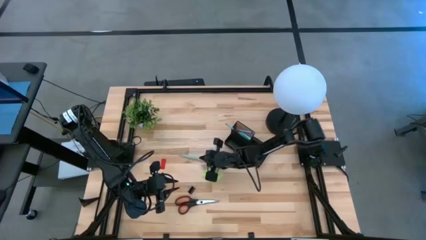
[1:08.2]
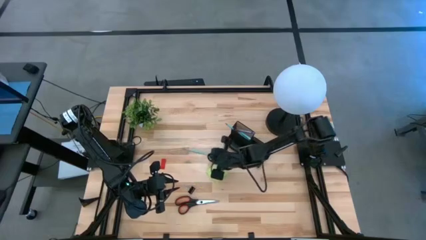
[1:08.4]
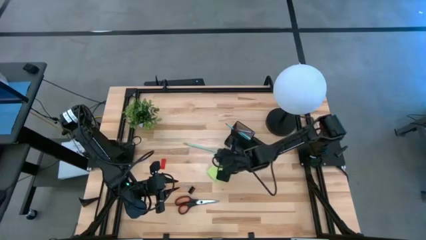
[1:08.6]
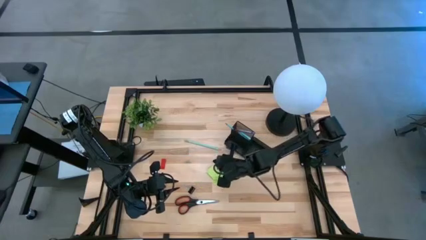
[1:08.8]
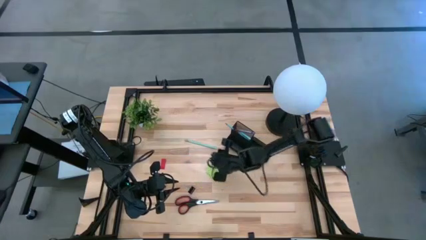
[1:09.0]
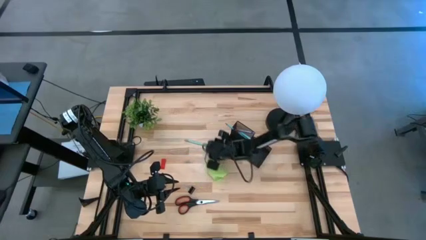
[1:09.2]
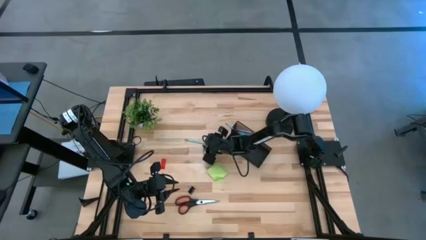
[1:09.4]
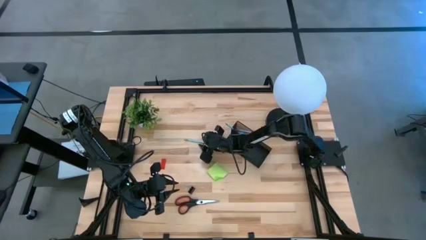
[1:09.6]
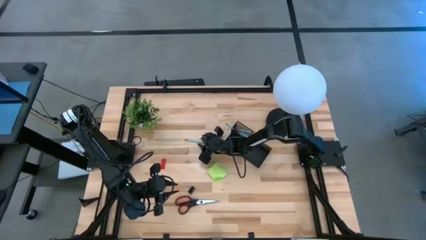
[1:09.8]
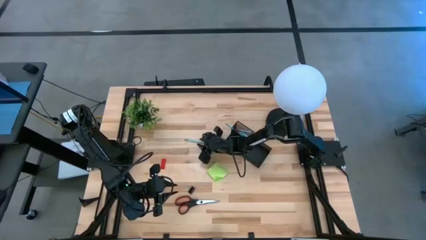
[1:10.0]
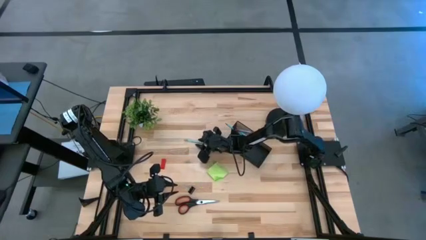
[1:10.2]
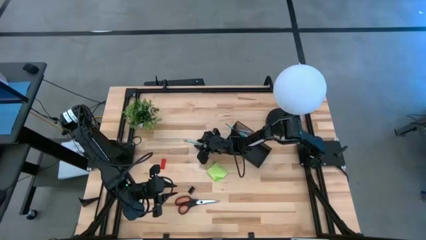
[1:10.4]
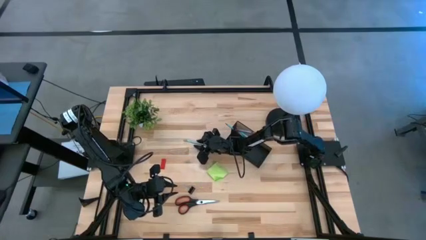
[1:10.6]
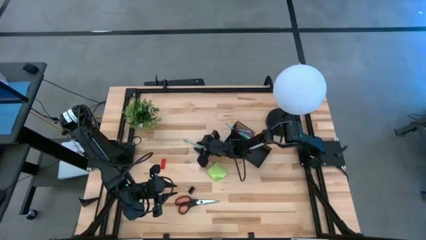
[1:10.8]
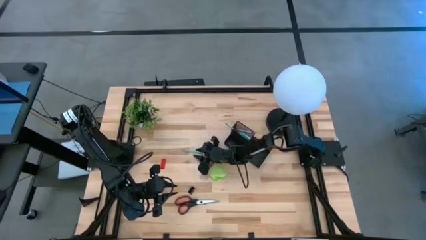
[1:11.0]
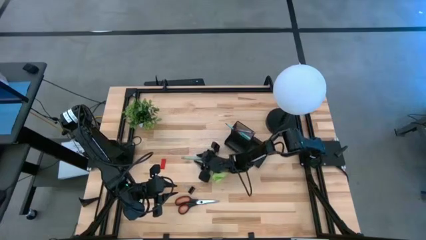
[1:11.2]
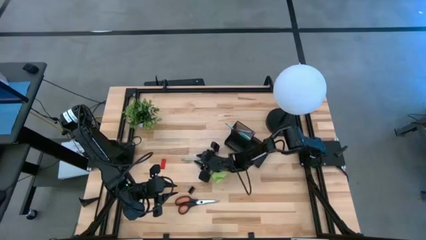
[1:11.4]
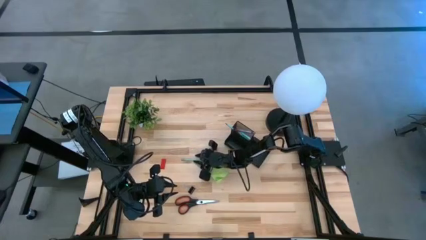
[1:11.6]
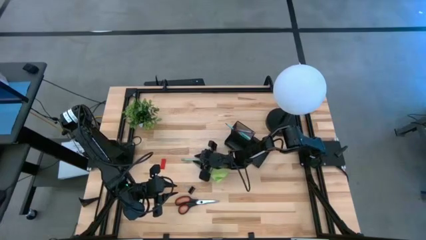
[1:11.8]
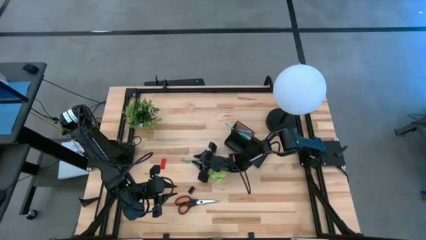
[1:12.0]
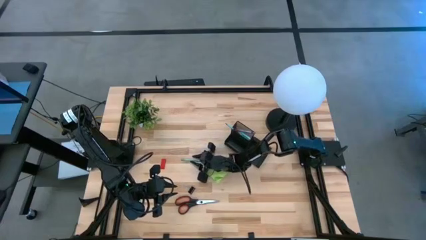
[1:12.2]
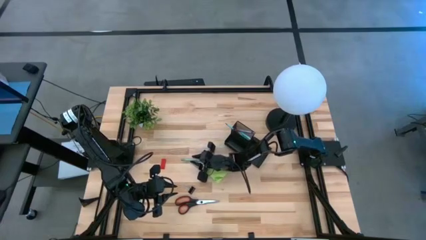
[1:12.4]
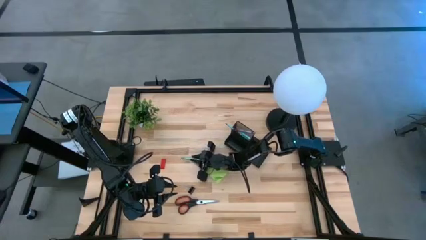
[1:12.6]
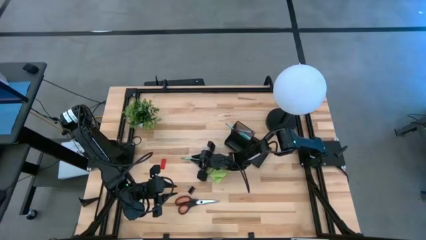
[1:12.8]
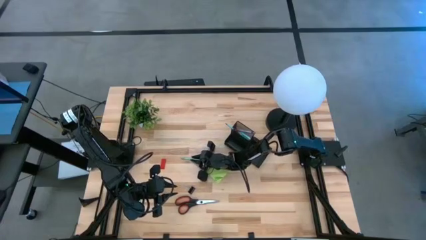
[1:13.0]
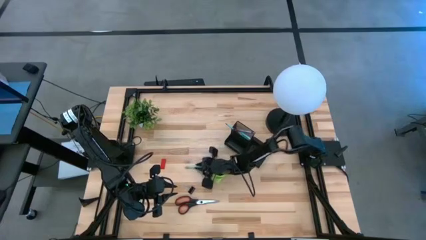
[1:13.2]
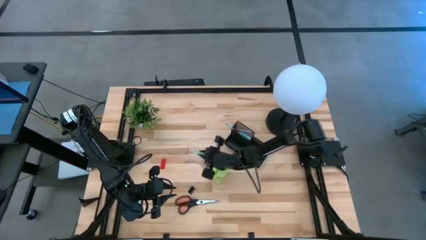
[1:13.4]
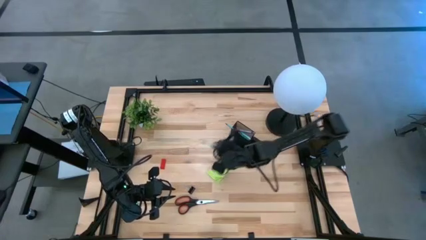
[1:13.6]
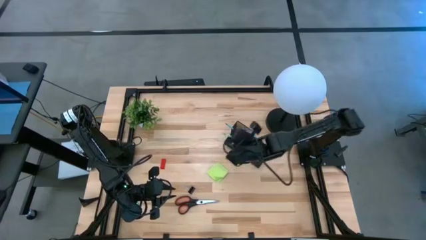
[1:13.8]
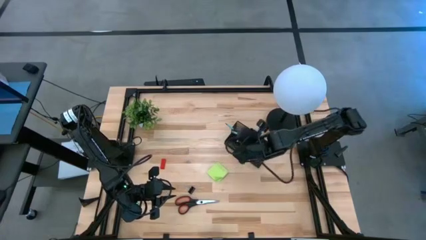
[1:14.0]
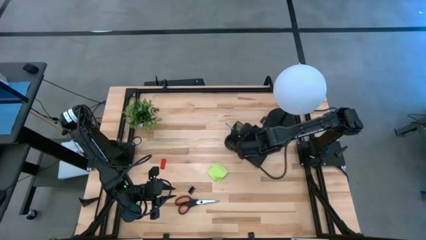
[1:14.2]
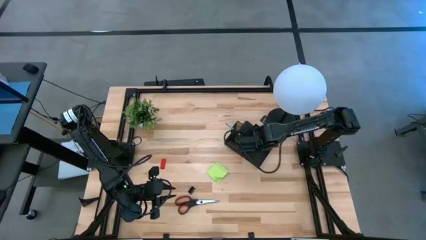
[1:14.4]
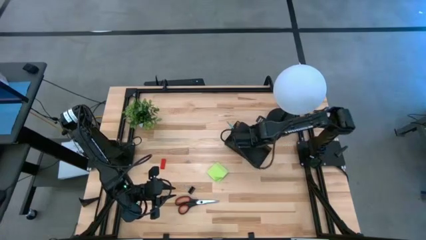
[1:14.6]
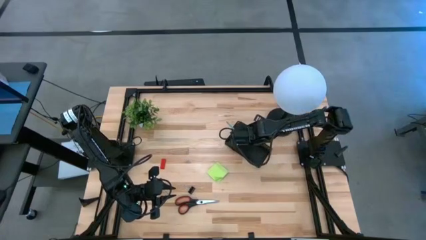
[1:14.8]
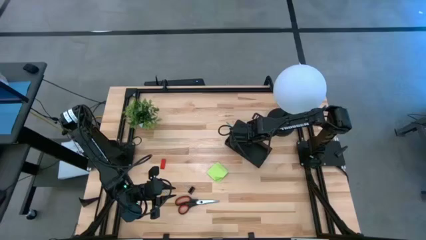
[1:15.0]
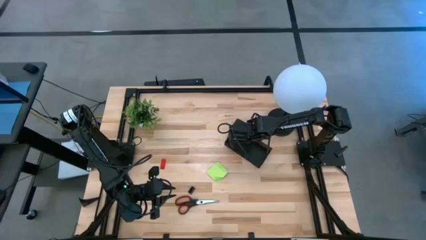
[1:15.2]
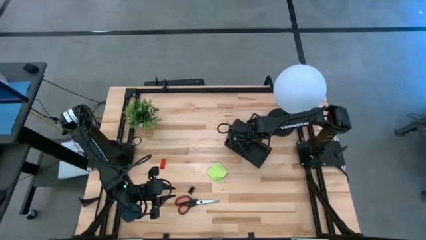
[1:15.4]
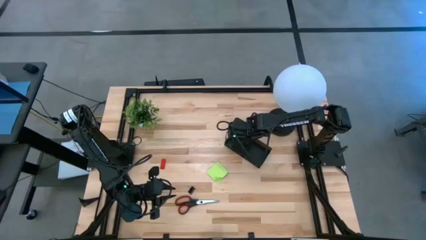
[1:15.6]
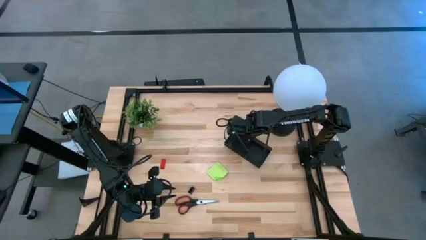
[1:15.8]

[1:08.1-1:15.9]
Task: Pick and place office supplies into organizer
Put the blue pencil into the desk organizer

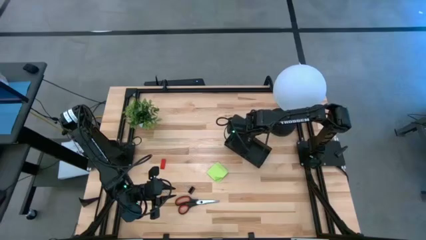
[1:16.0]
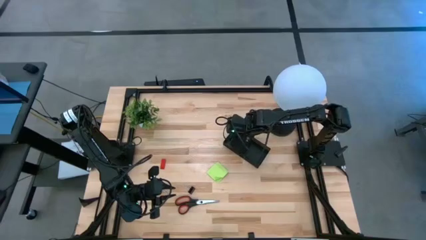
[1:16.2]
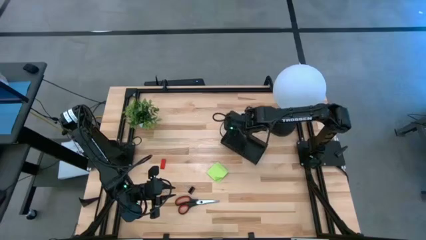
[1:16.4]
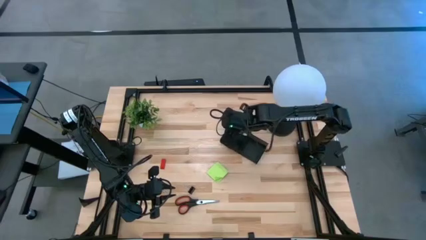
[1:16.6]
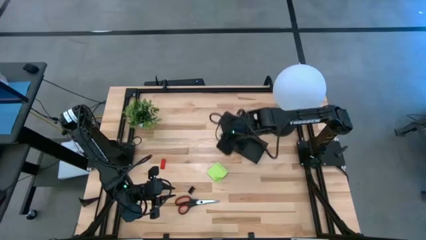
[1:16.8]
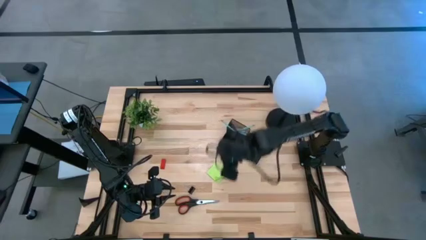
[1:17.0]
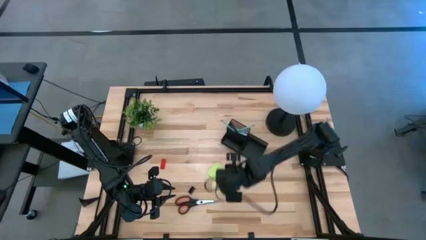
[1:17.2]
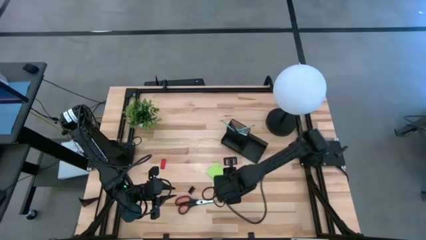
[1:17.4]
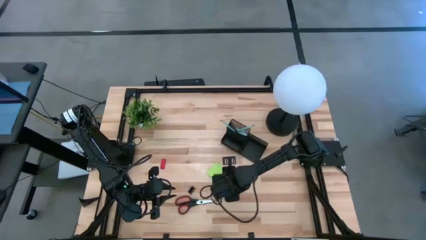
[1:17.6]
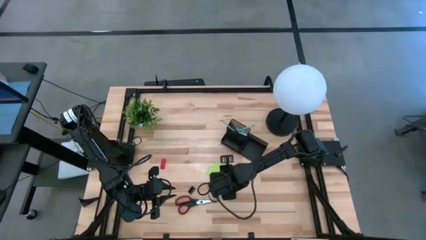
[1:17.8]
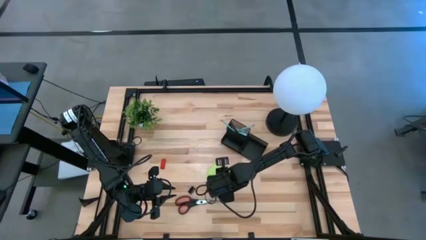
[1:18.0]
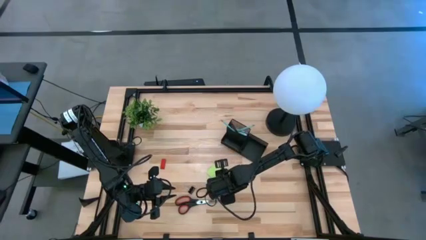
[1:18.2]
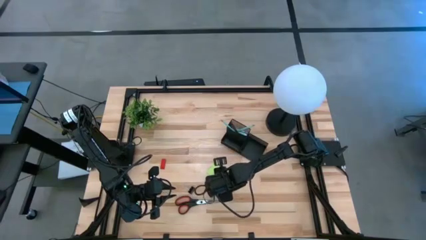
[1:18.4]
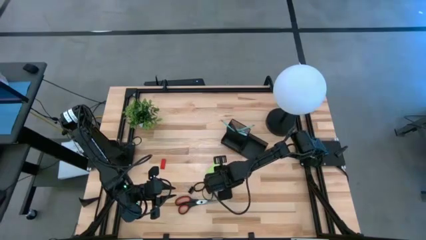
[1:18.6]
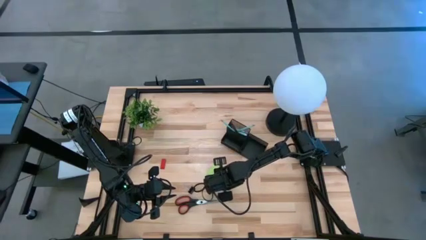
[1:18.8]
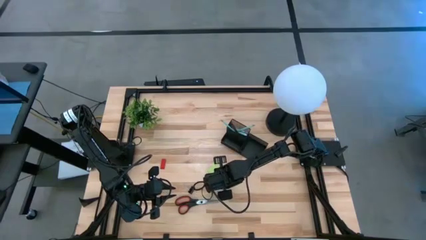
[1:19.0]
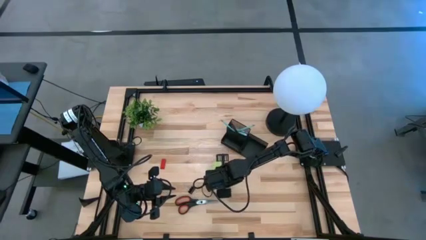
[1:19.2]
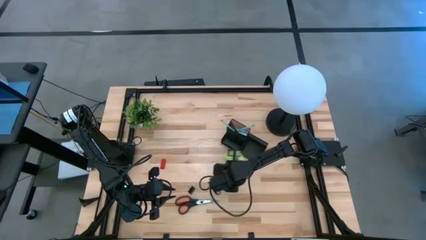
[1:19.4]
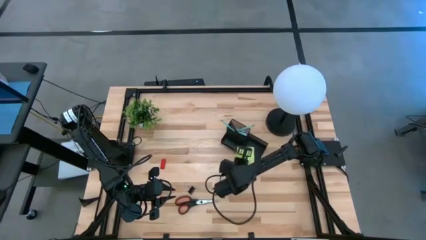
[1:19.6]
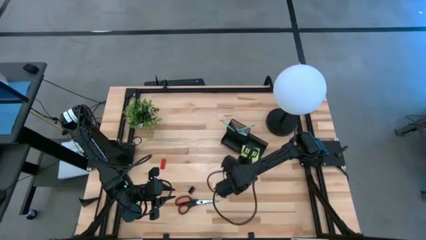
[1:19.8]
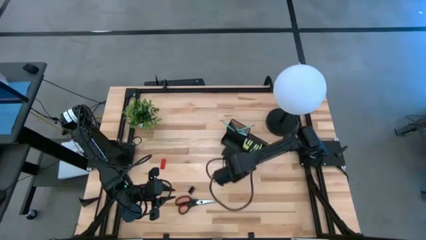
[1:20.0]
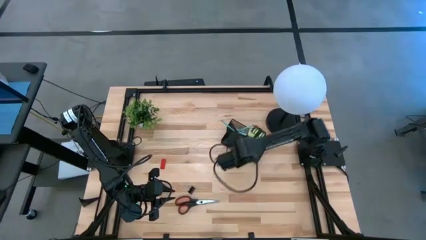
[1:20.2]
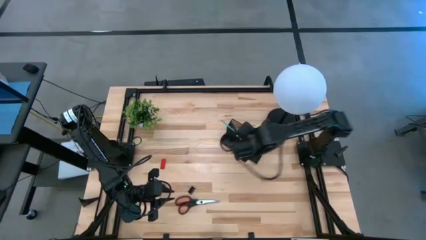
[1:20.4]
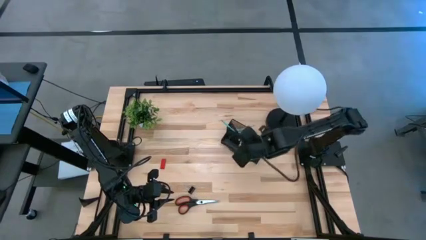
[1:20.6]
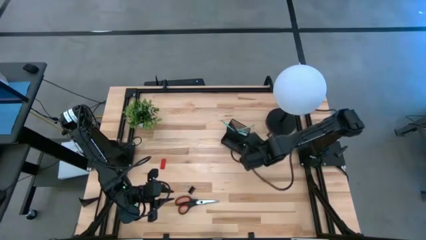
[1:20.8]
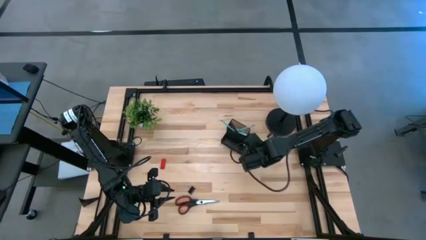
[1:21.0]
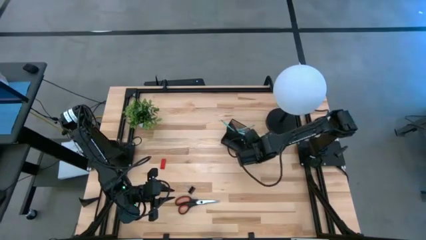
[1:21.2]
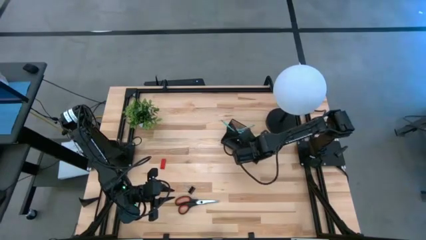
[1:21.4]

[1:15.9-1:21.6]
Put the green sticky note into the desk organizer

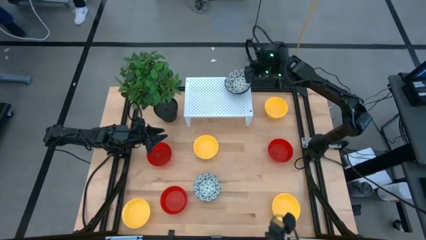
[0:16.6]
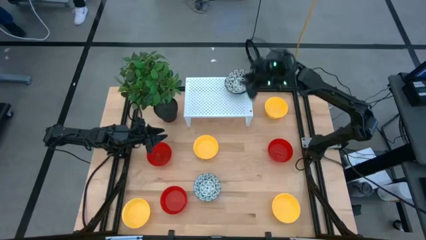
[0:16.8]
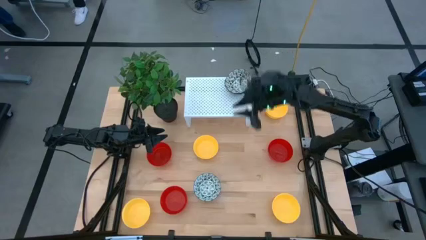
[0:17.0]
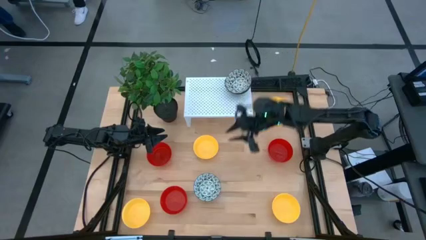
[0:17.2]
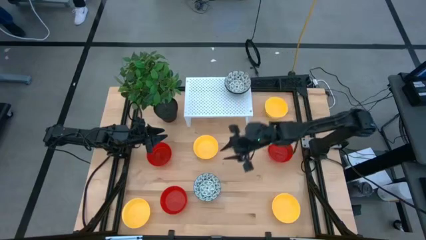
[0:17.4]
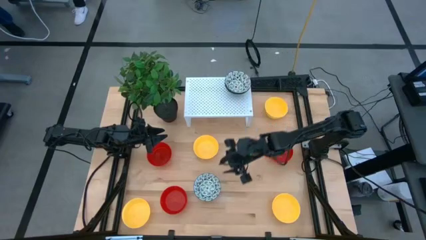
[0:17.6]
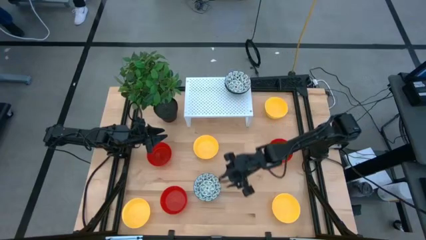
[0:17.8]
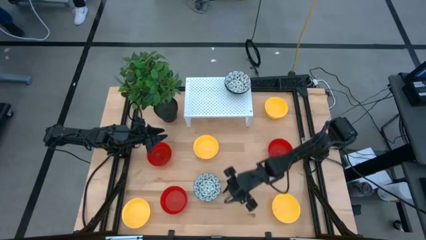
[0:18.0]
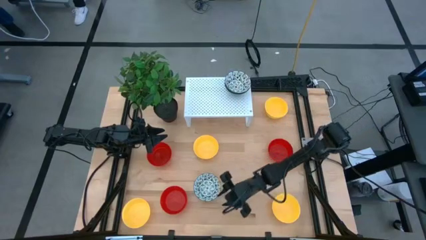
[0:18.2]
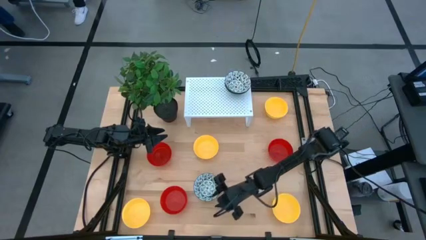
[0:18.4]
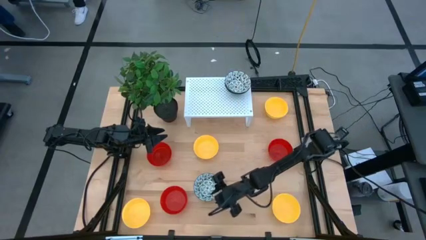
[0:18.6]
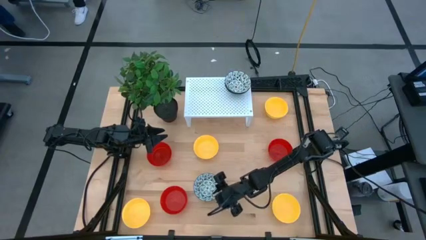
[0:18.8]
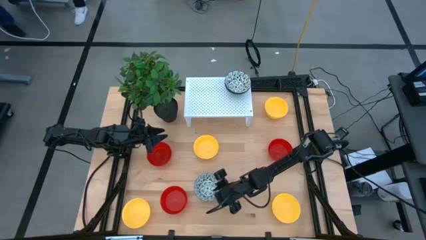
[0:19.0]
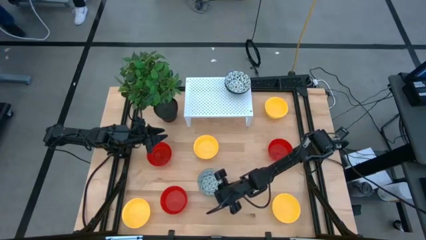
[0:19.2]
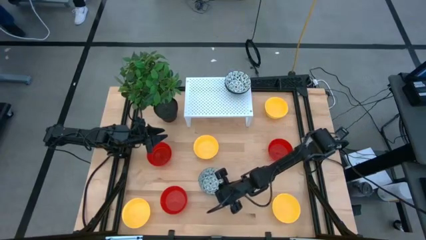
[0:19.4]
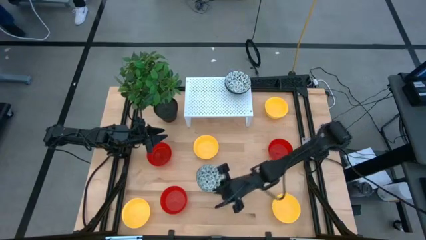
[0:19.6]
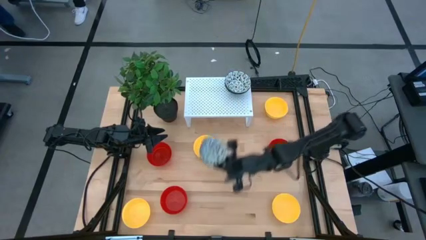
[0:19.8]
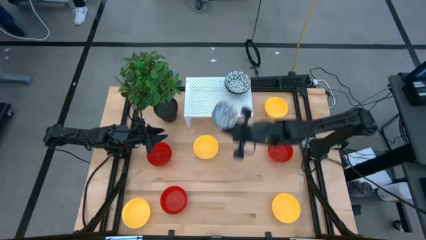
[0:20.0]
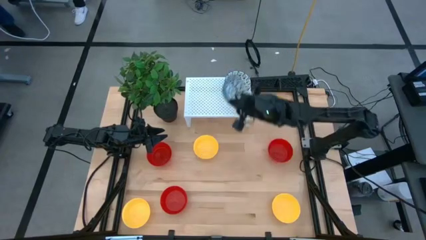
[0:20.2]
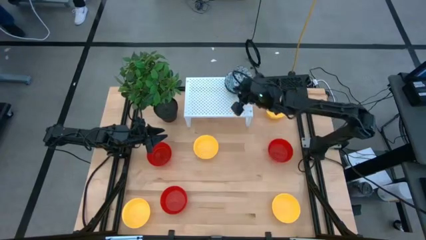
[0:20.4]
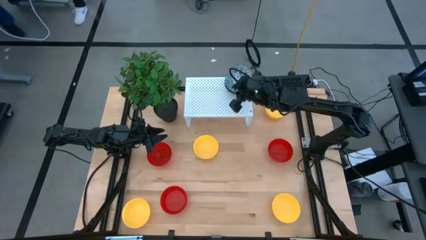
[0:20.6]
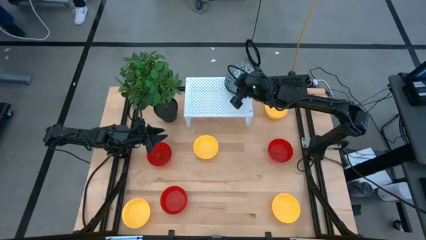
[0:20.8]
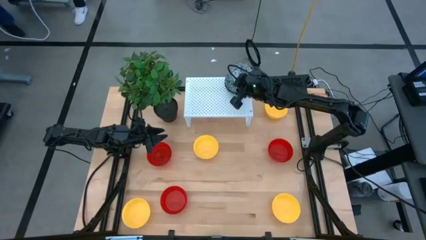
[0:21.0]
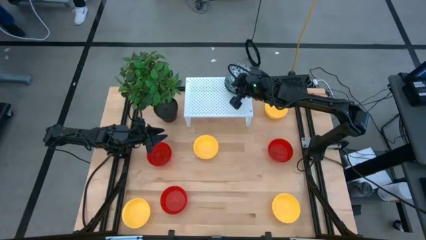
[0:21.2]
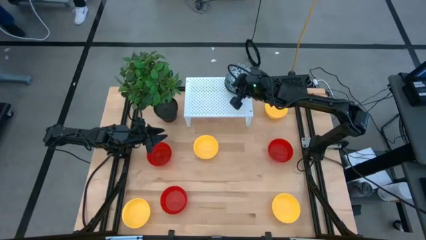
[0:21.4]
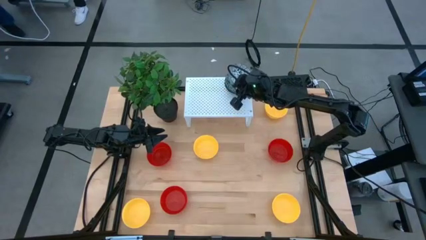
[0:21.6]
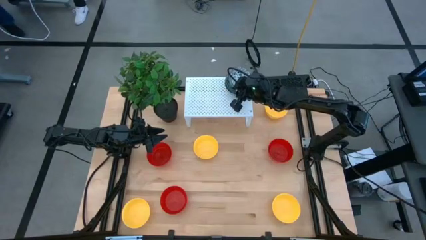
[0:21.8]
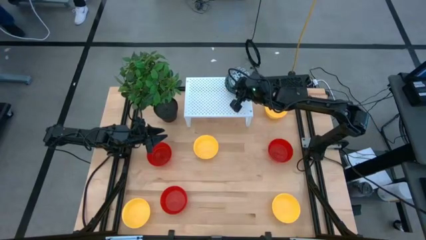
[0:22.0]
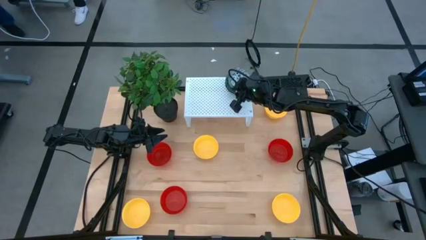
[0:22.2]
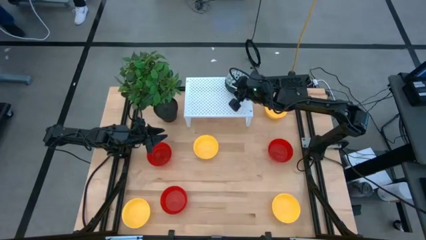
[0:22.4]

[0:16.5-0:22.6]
Task: Pick & Place Mini bowls
Stack the blue patterned bowl on the blue patterned bowl on the shelf
